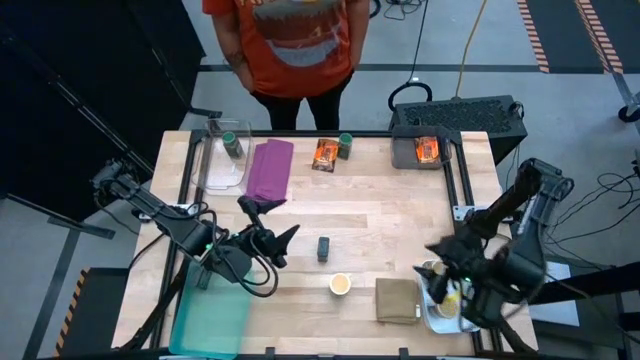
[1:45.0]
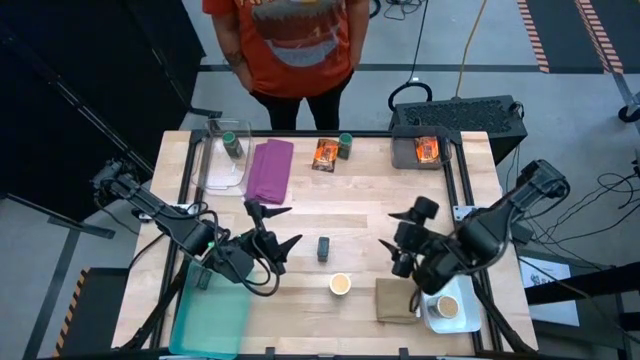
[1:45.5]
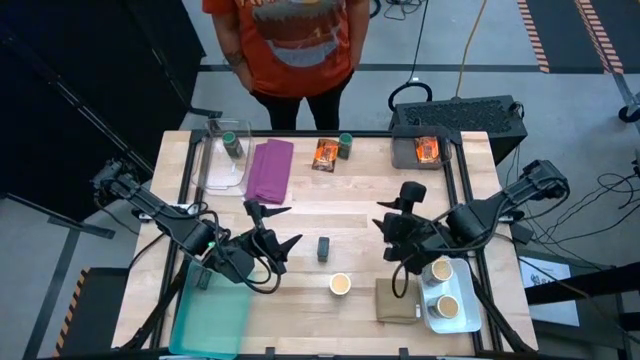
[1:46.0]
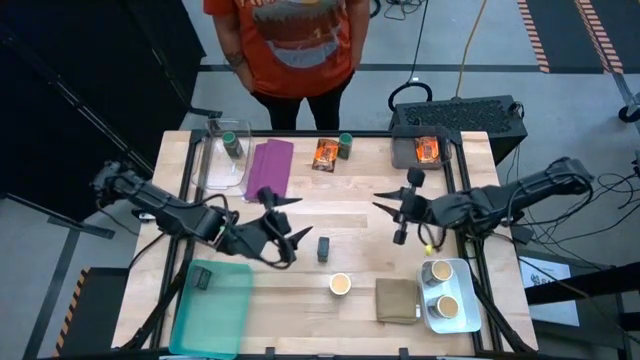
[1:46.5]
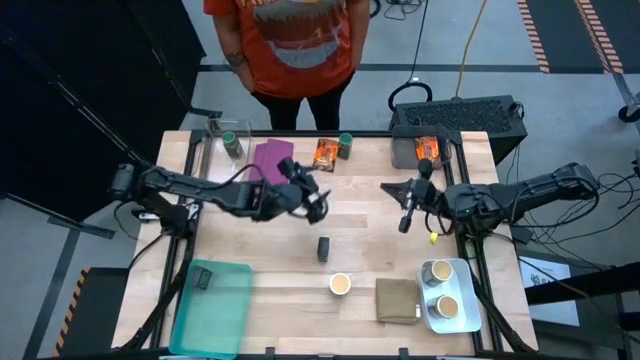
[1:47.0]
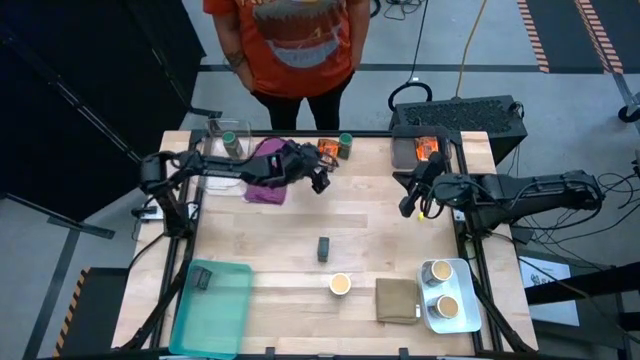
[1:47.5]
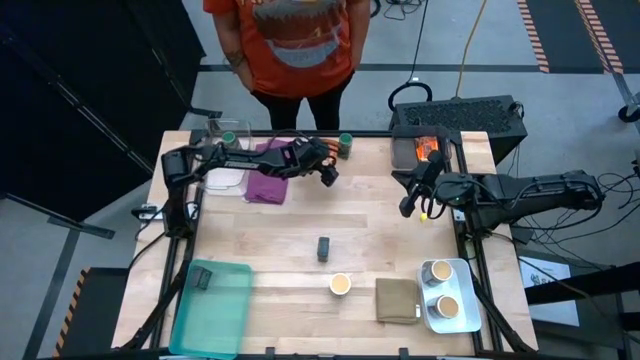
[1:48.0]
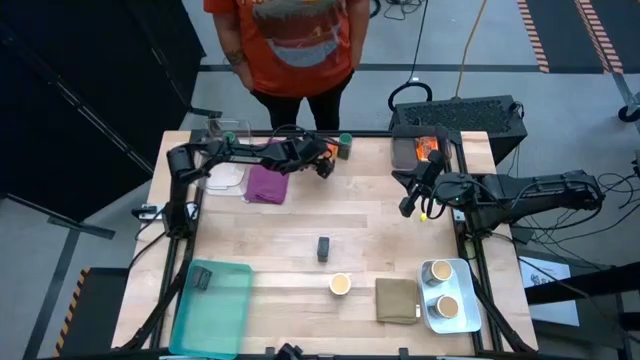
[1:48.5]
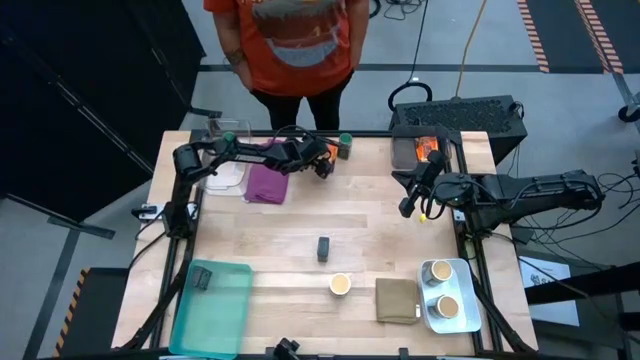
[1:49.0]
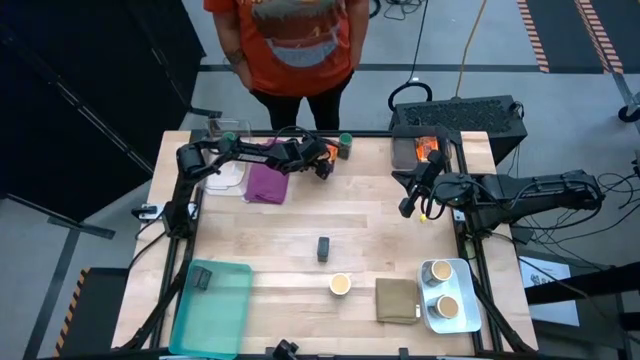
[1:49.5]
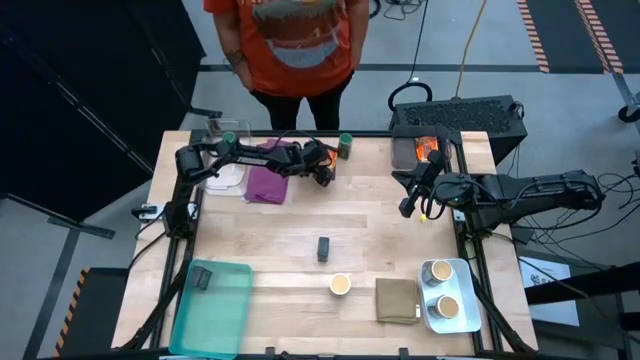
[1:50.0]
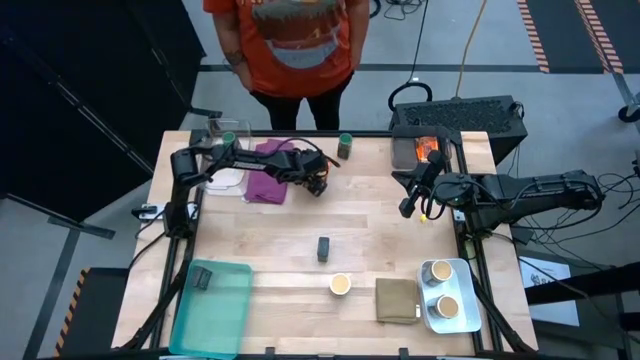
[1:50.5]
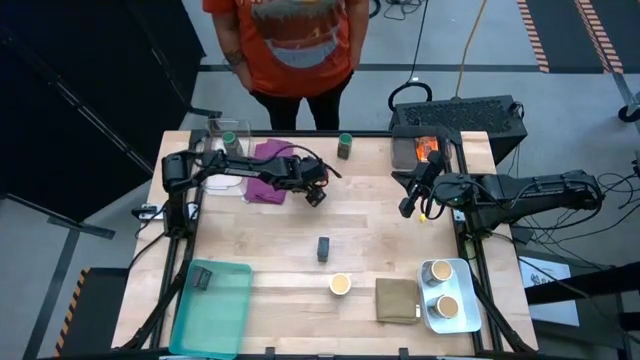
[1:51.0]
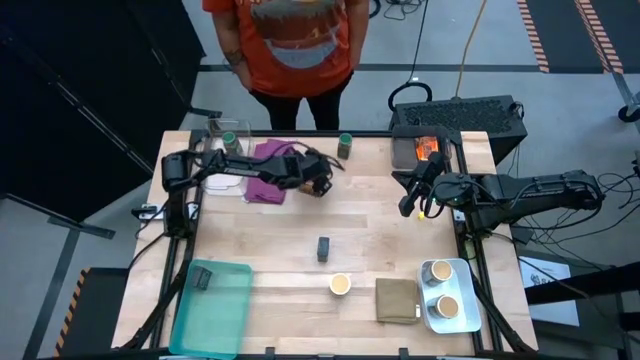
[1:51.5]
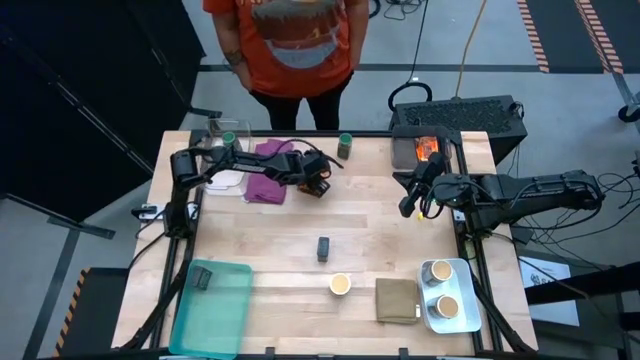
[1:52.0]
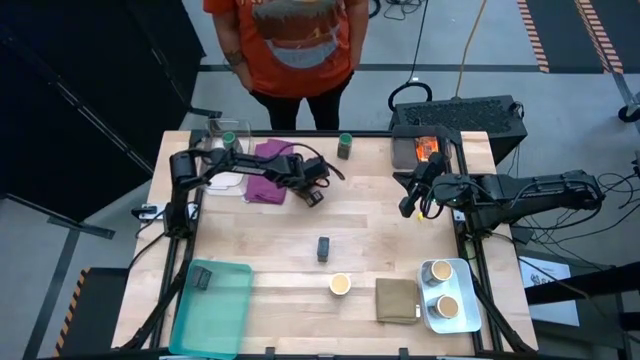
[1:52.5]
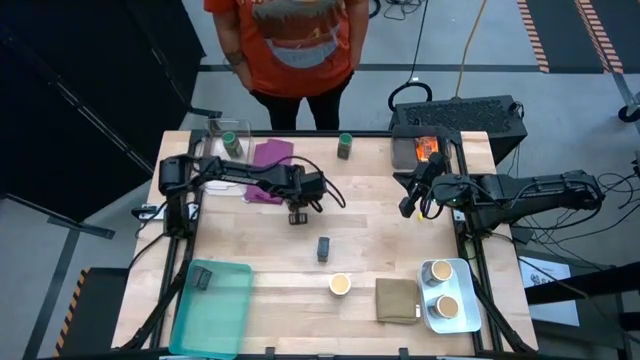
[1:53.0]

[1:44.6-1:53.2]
Task: Sort spices by type
Put the orange seasoning bag into the black bin

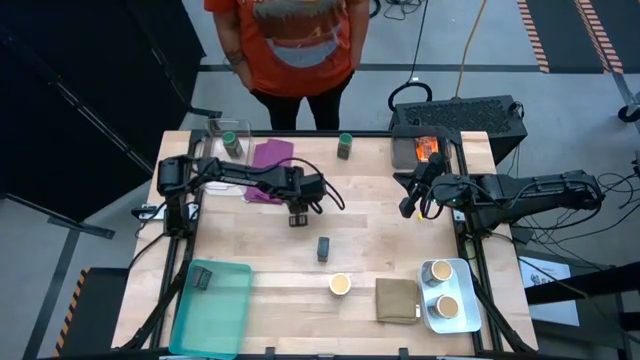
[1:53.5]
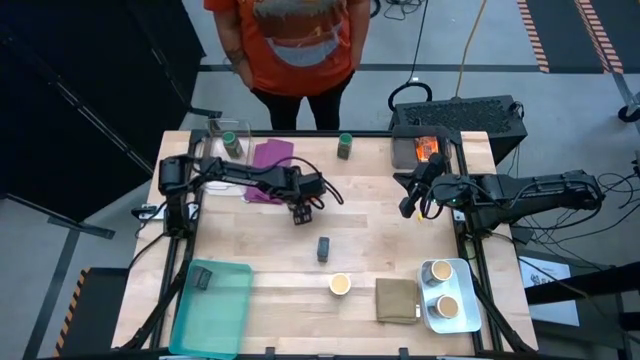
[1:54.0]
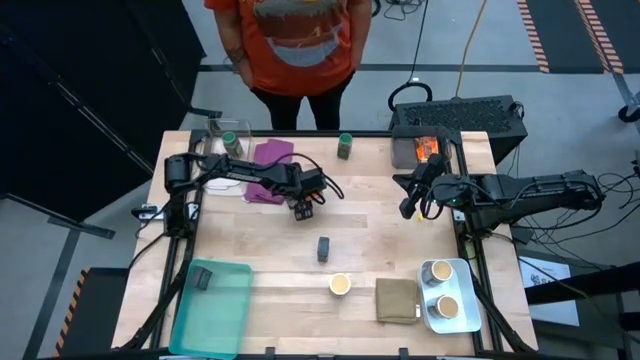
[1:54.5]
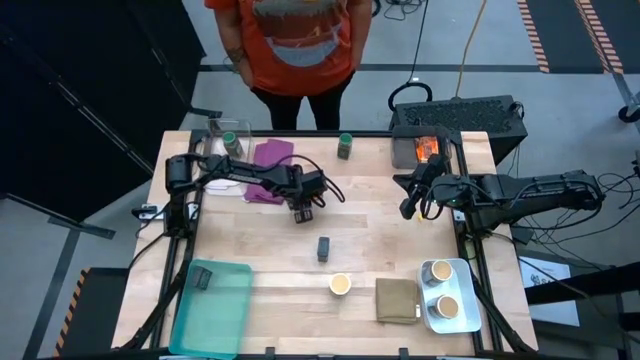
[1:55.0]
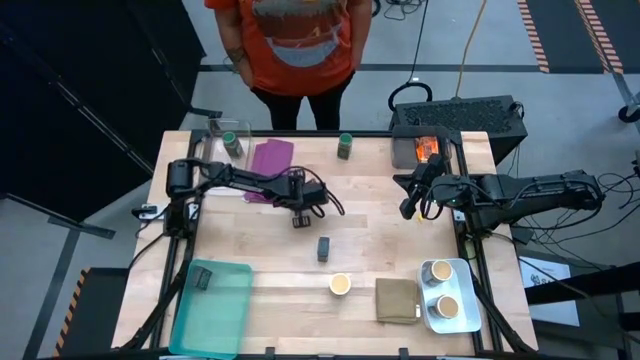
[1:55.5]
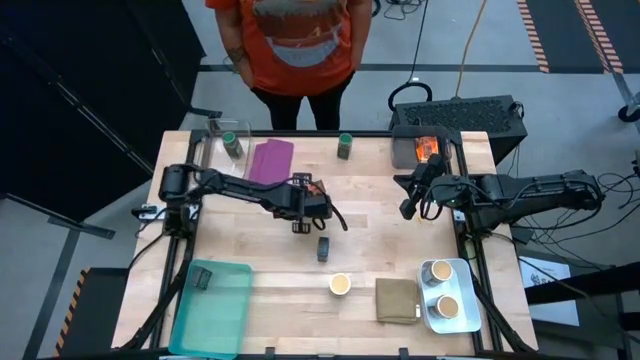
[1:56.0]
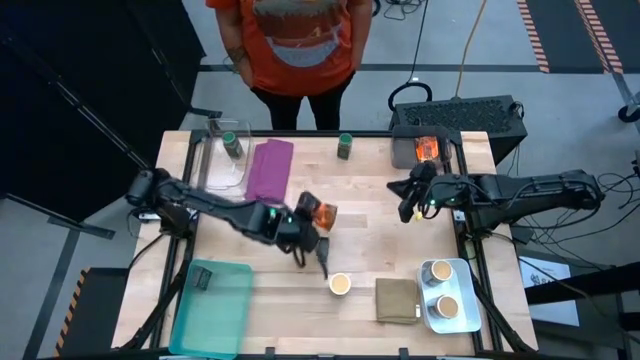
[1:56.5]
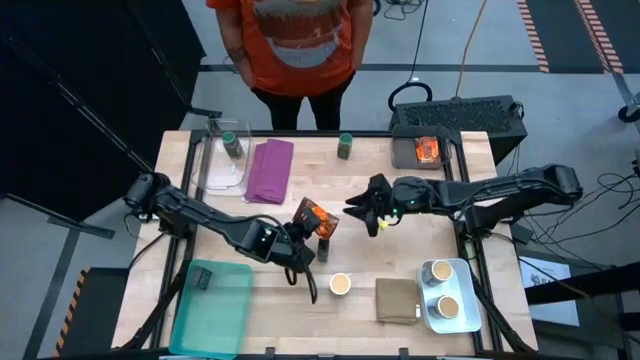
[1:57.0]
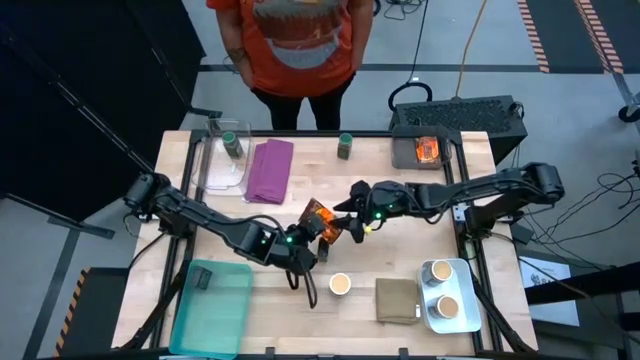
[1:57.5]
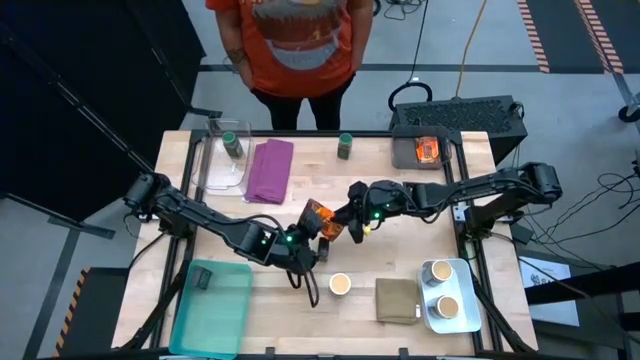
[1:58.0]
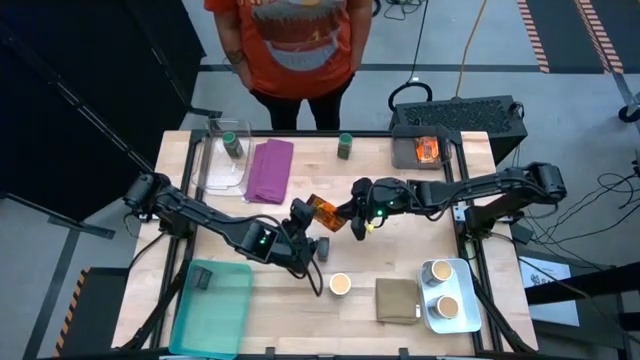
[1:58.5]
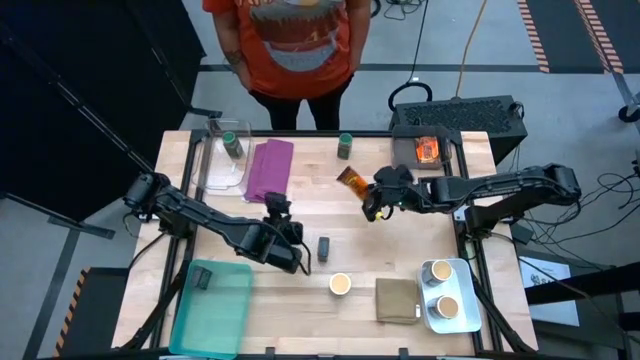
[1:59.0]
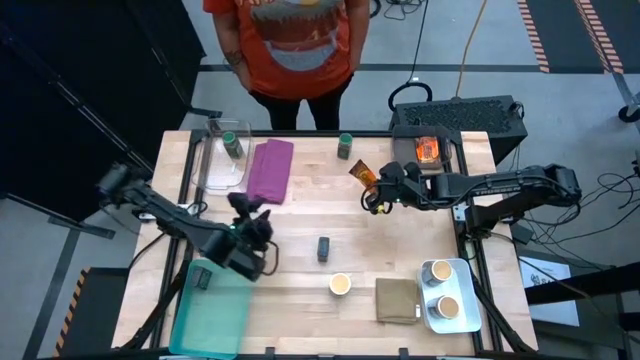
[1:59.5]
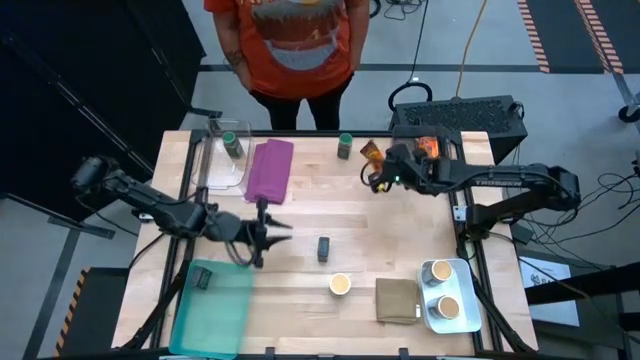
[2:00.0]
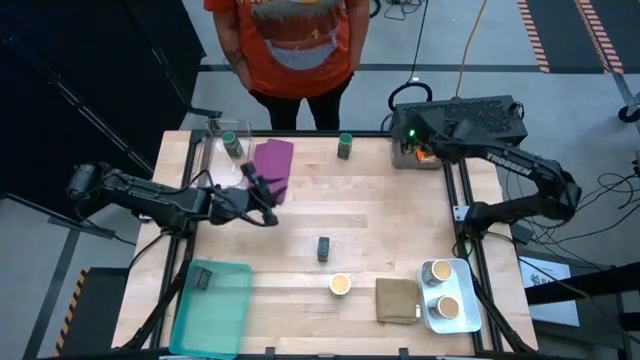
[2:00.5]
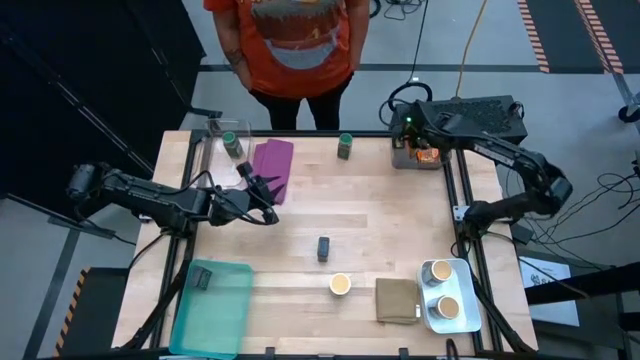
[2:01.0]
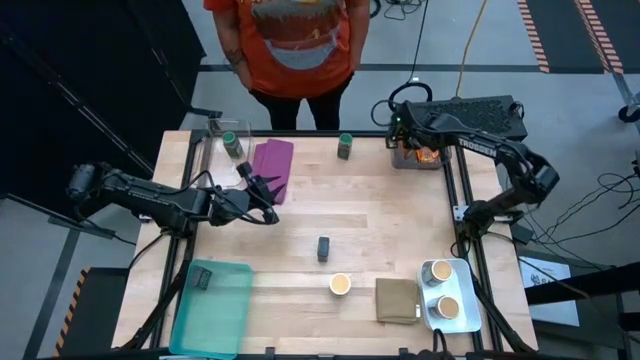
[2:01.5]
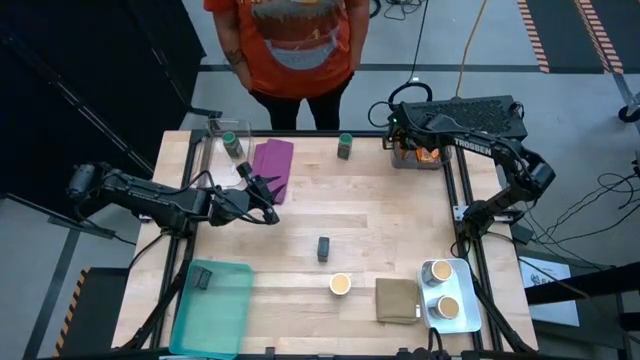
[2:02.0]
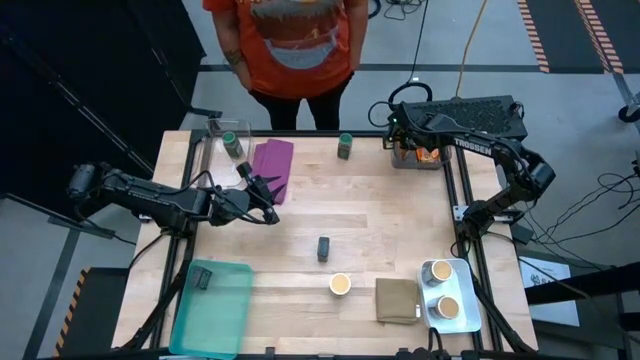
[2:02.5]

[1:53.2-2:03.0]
Put the orange seasoning bag into the black bin

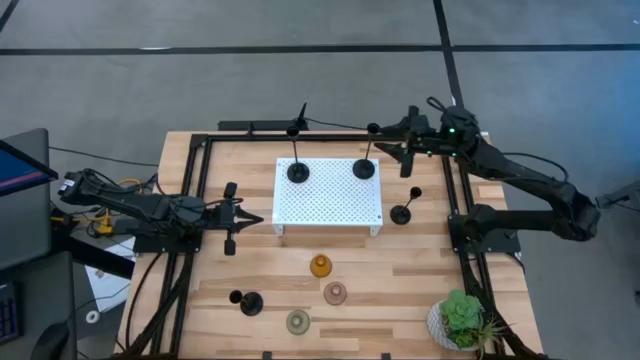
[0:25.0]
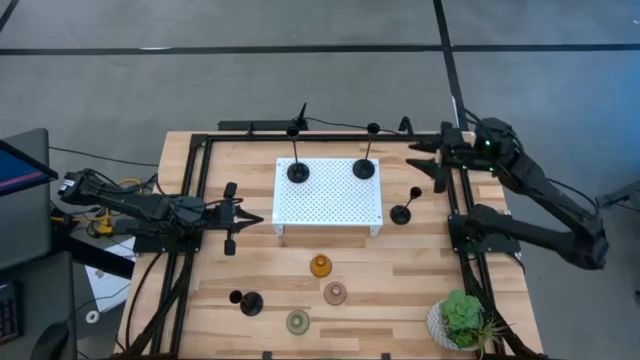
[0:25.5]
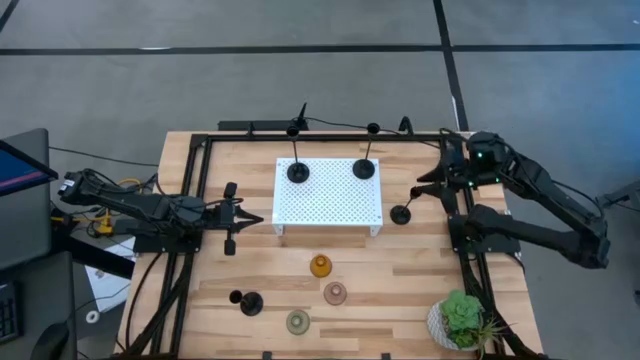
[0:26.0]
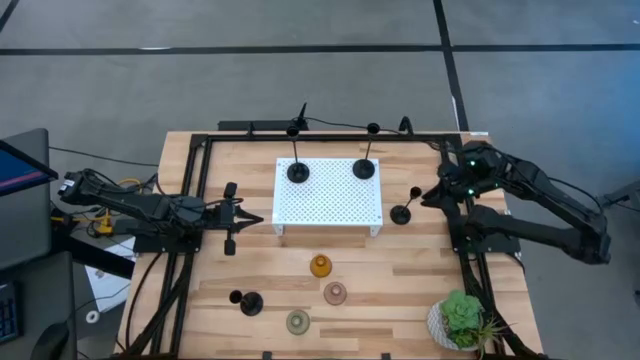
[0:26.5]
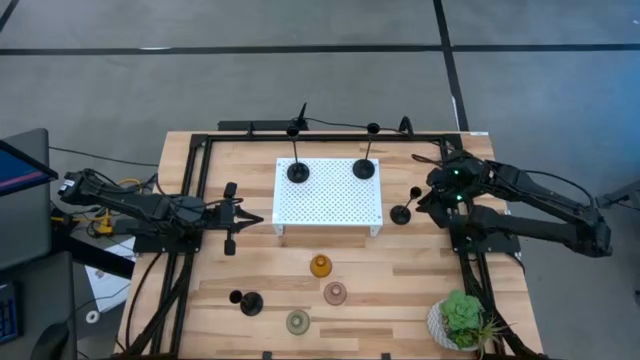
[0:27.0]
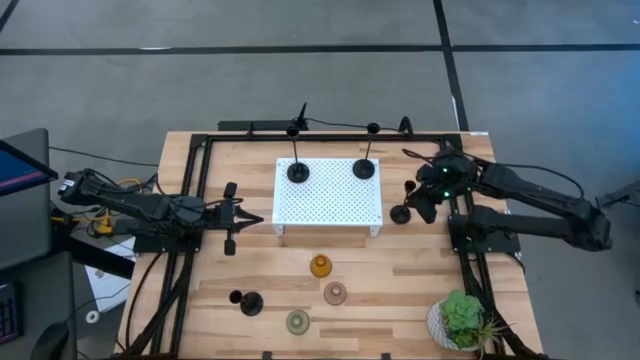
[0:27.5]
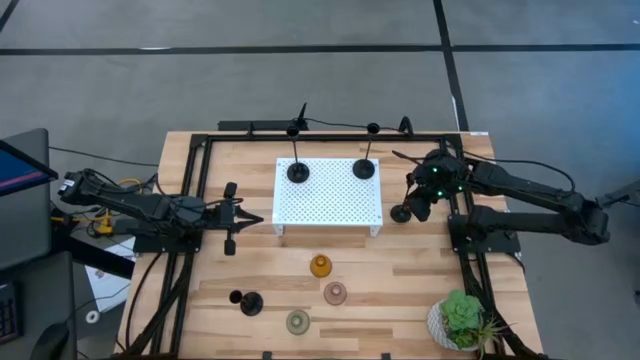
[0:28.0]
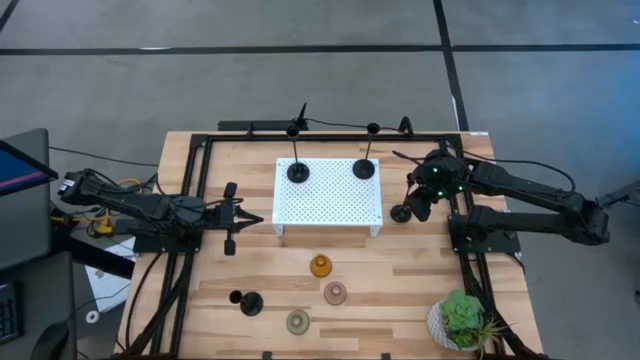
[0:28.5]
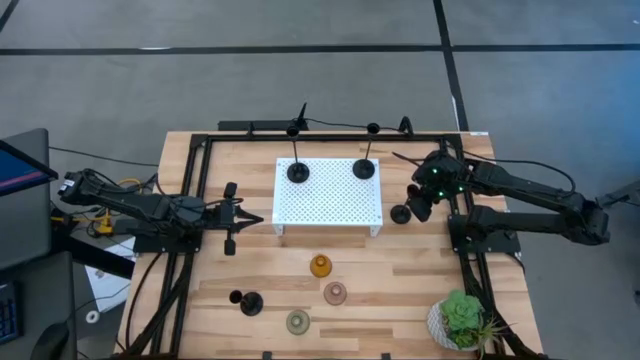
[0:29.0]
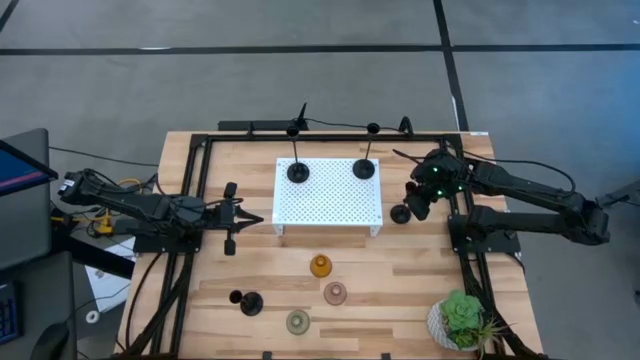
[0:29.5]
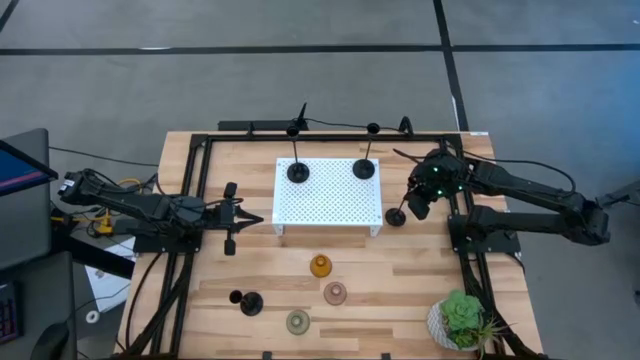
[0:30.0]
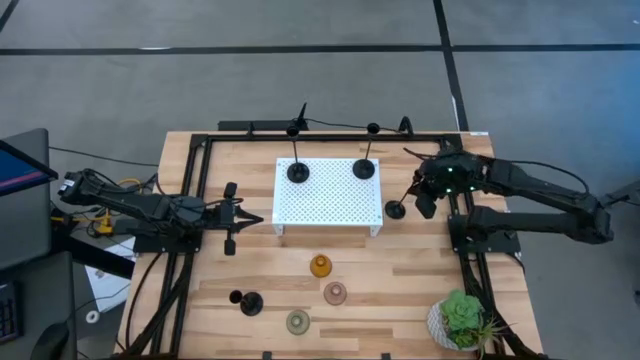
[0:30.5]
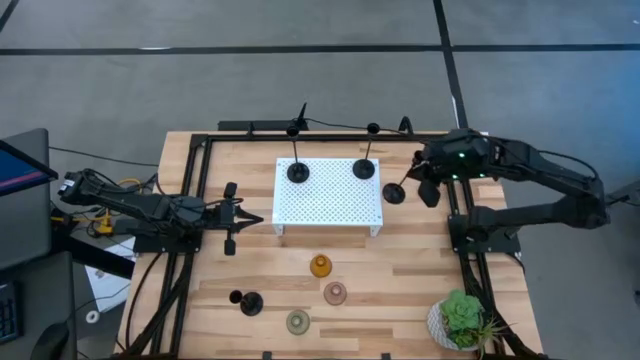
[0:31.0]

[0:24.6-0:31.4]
Task: Pick & Place candle stick holders
Align the black candle holder with the other black candle holder on the shelf
